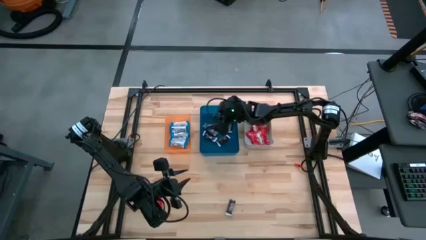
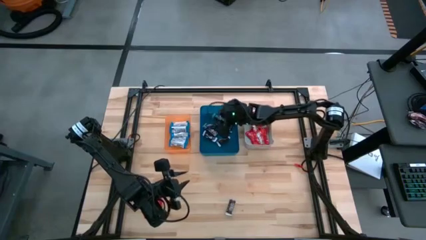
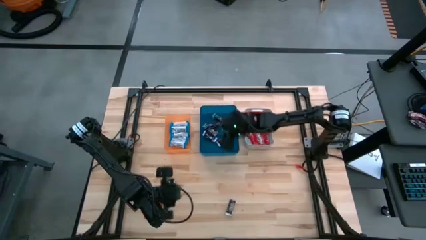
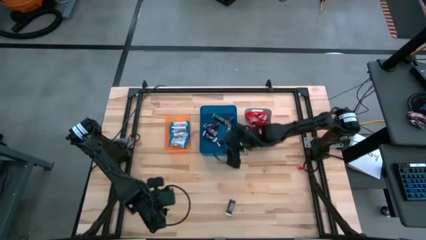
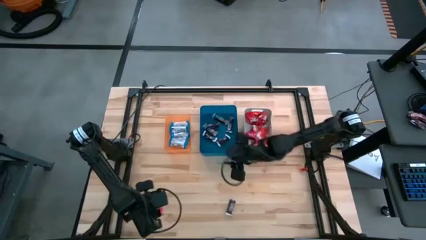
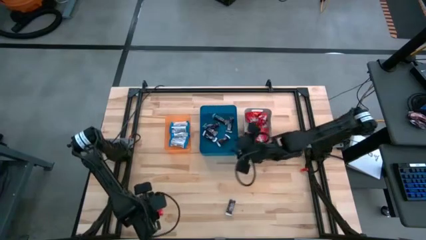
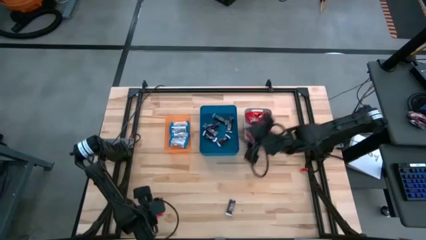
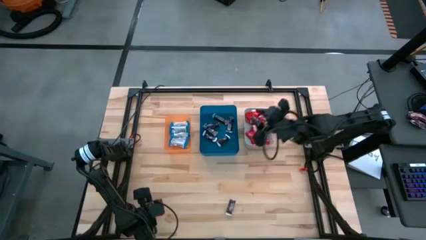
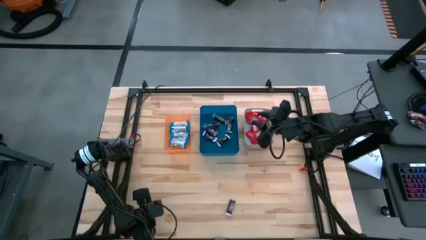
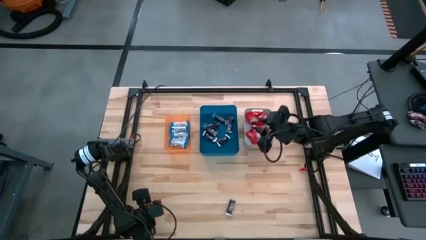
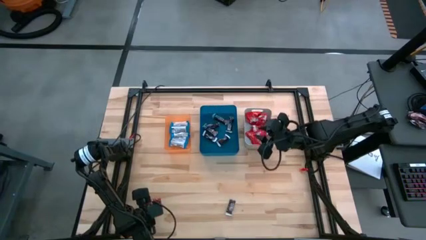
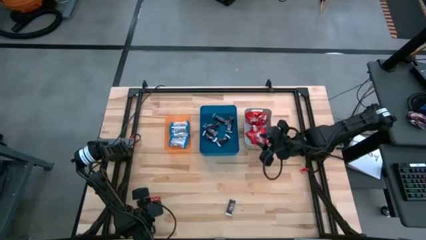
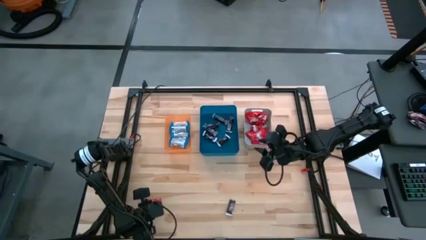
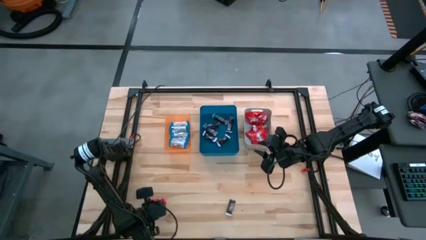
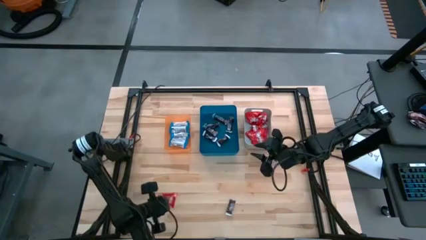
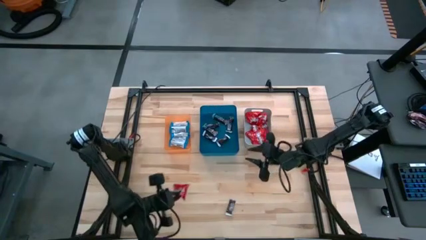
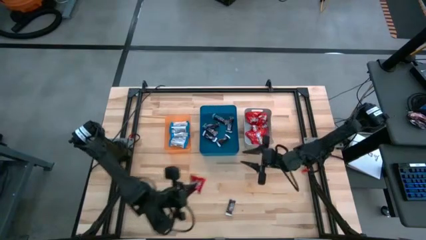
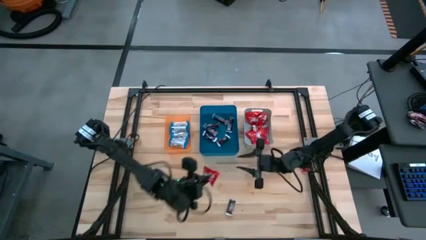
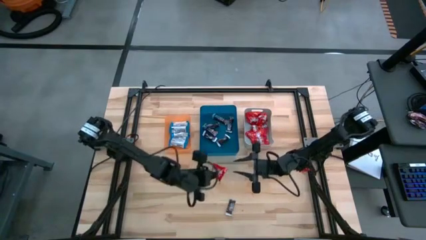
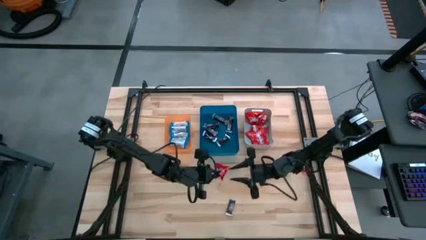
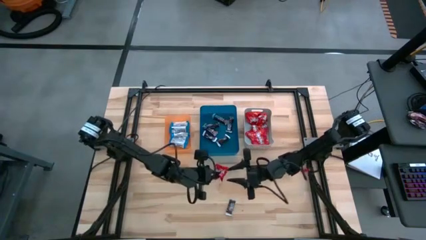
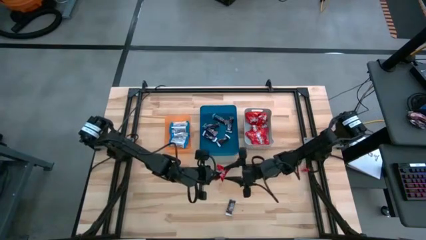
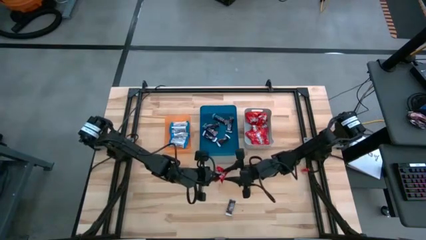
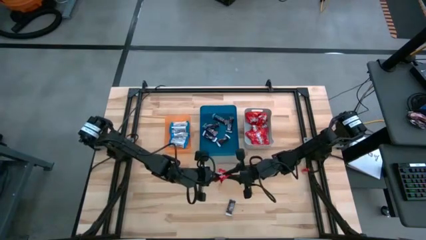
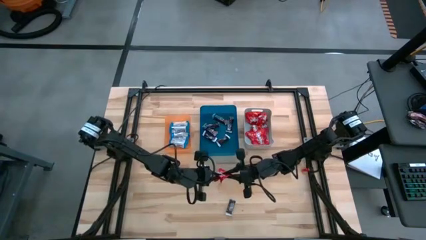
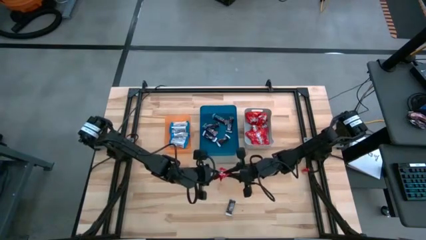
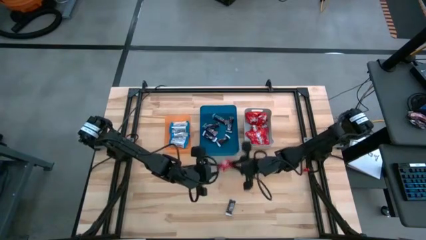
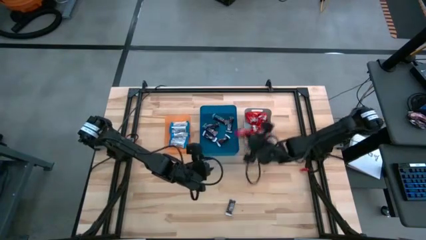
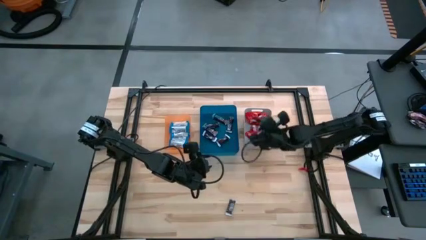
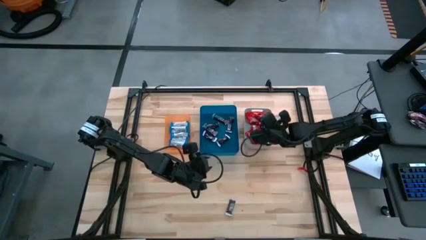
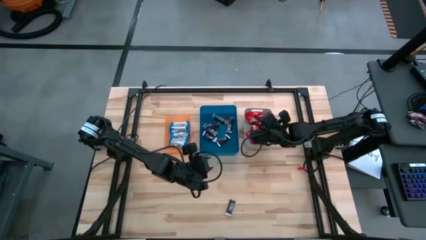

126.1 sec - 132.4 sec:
Task: Sort candy
Put the red candy into the gray bin

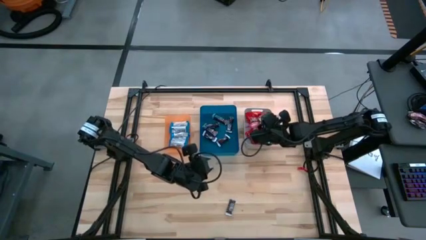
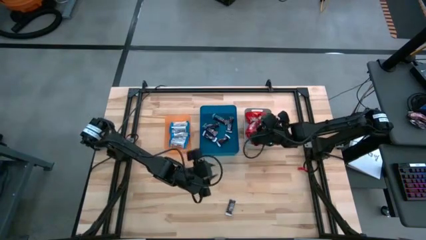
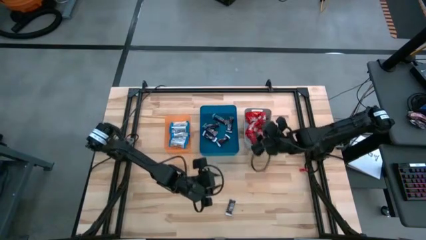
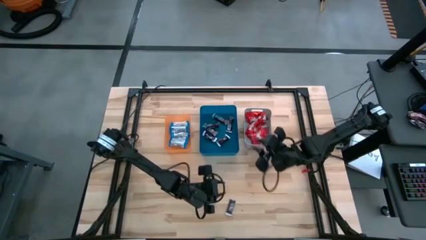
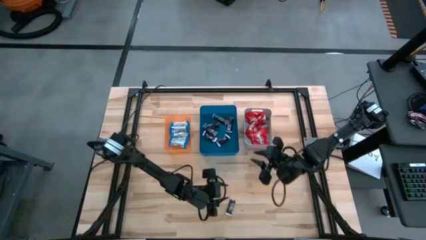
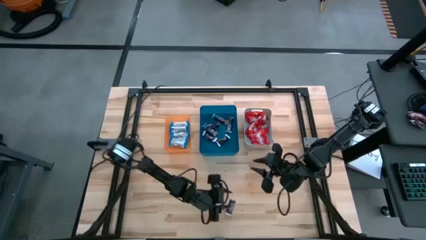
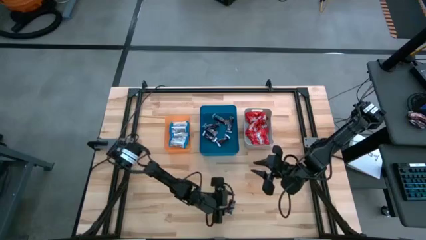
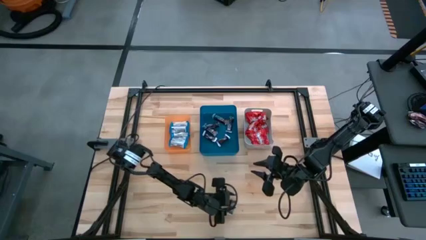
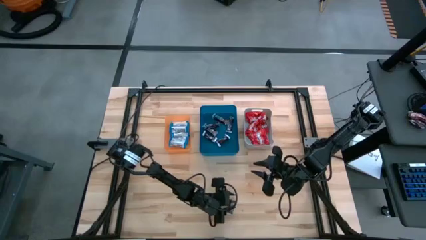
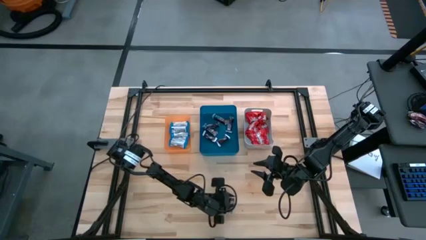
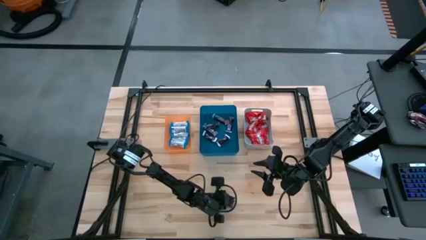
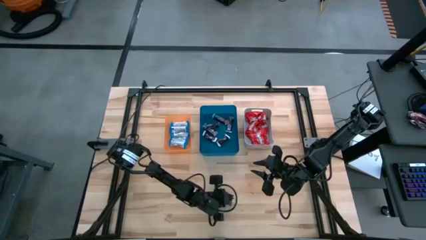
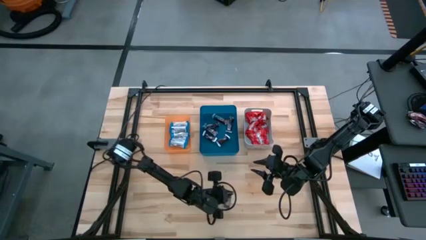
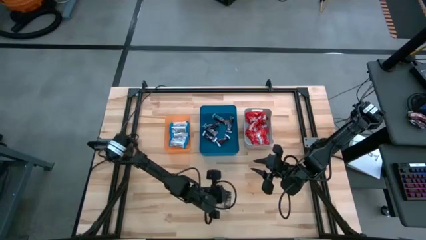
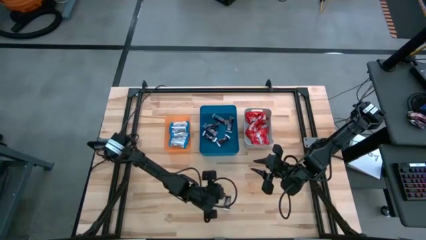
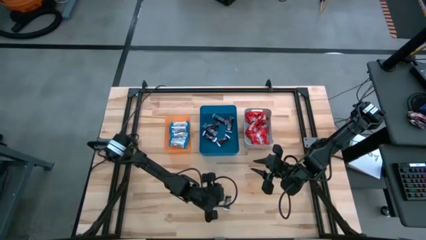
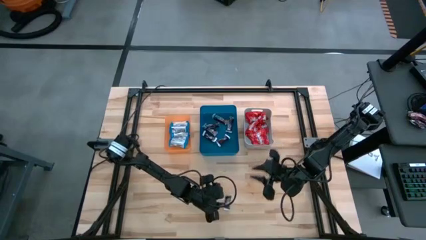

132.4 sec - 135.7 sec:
Put the brown chocolate bar into the blue bin

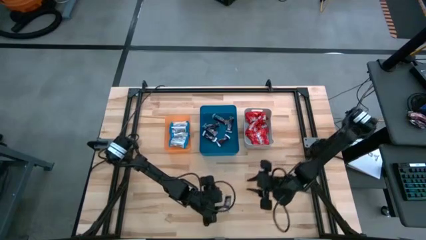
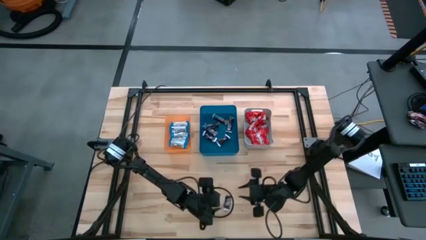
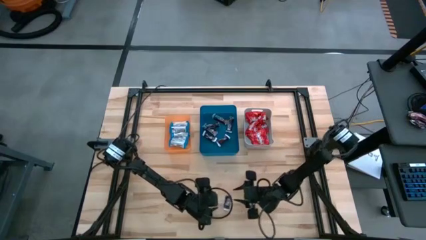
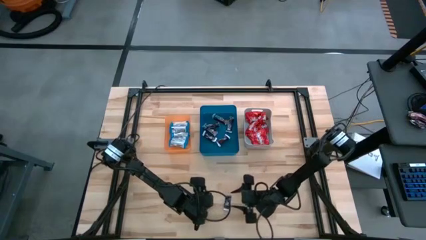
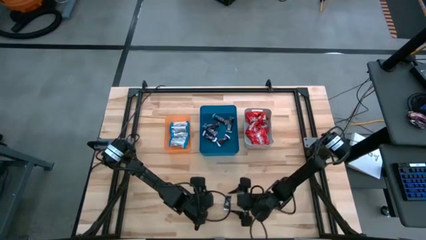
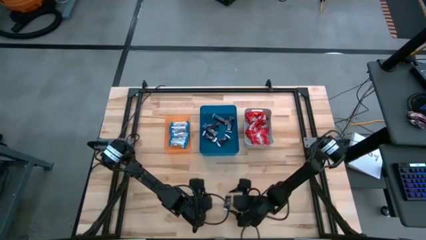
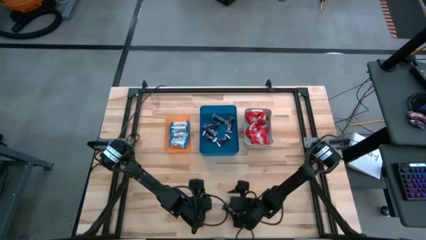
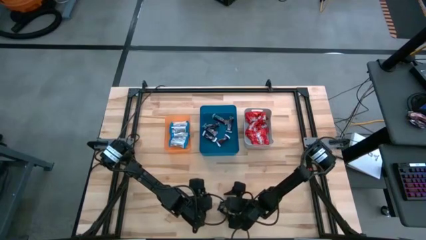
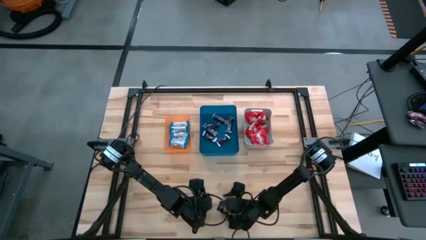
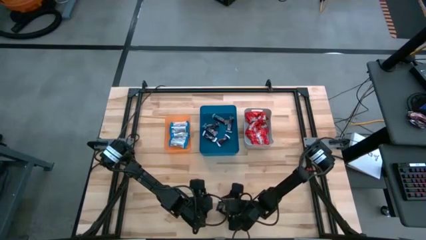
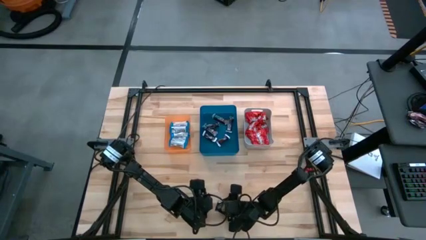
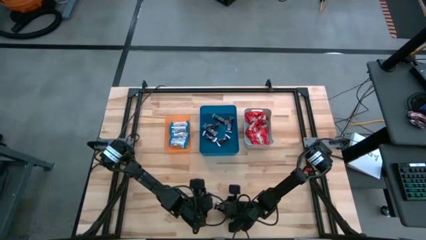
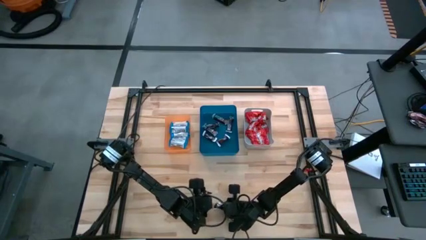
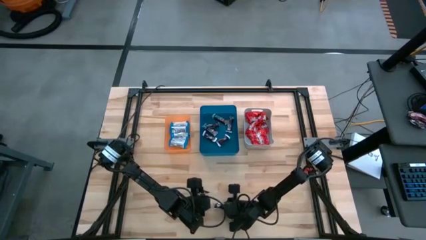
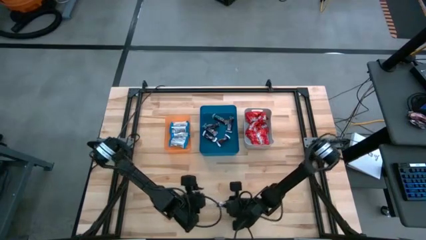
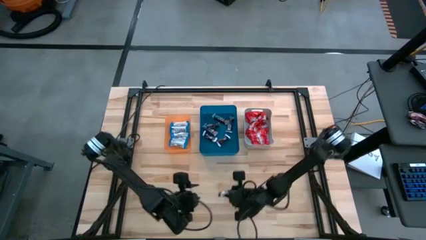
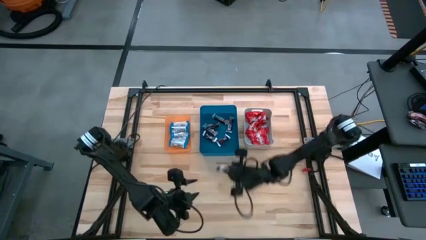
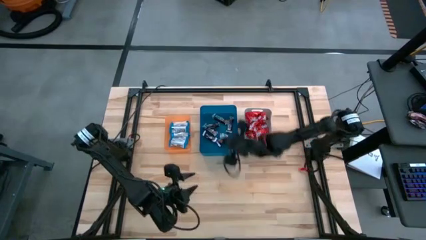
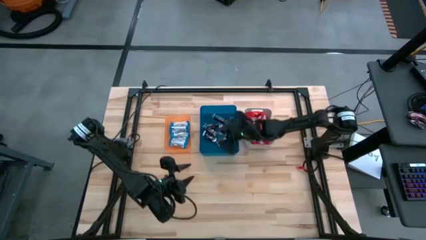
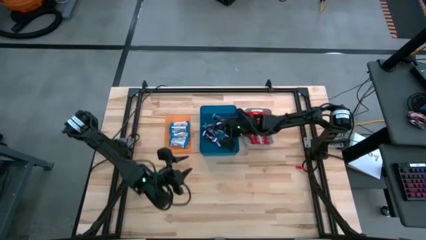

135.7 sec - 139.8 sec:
Put the brown chocolate bar into the blue bin

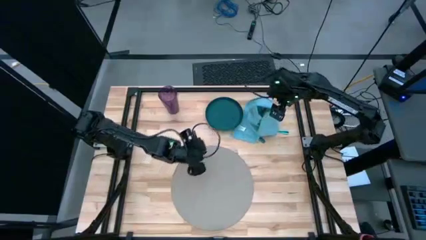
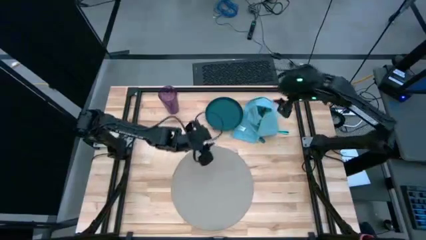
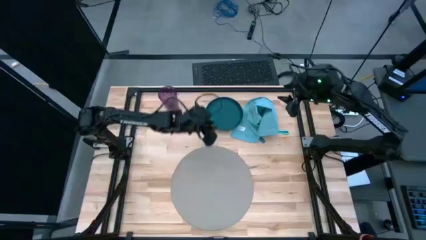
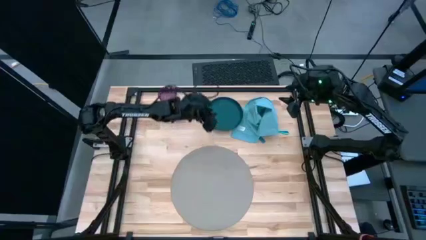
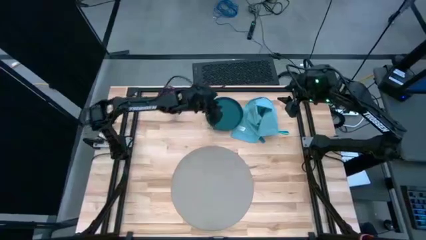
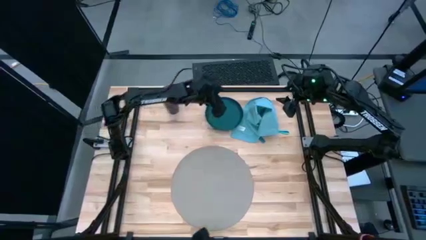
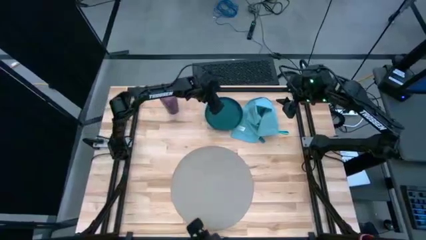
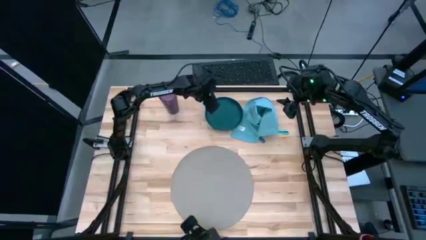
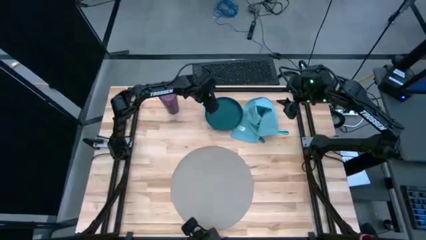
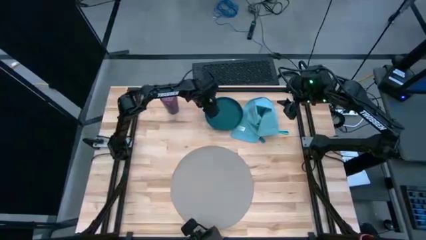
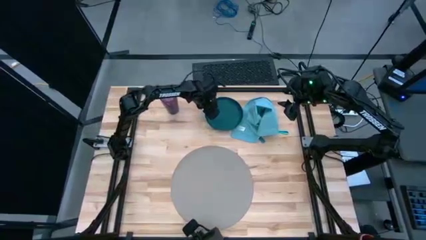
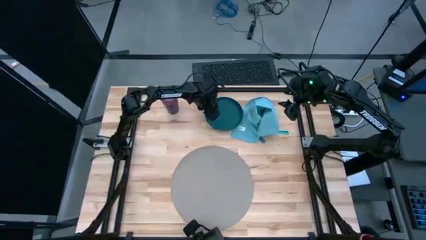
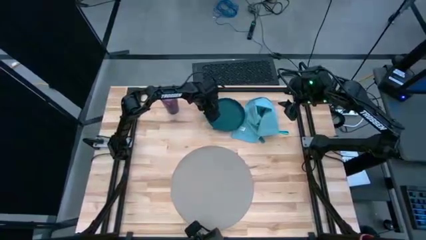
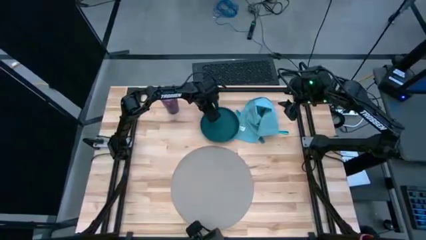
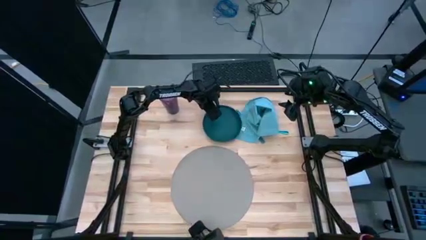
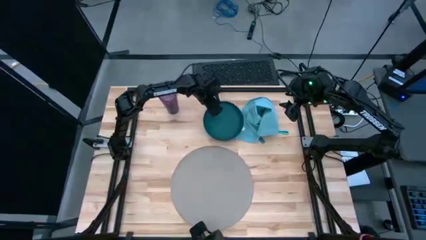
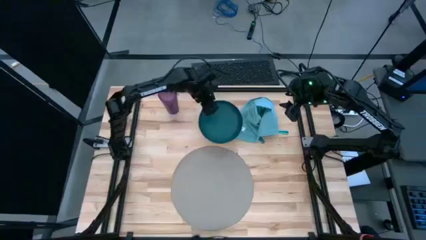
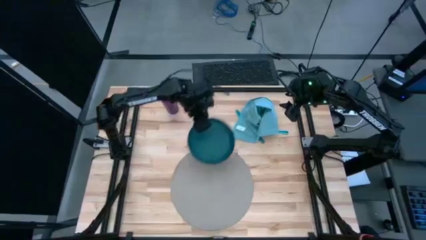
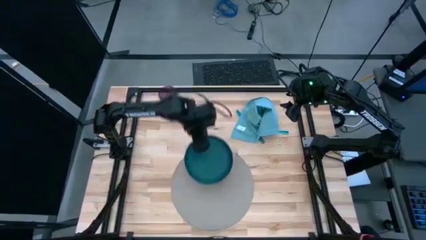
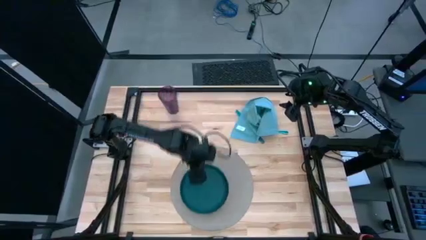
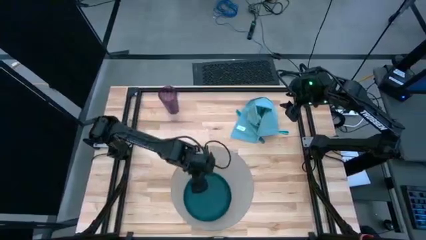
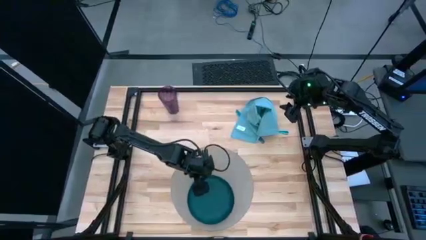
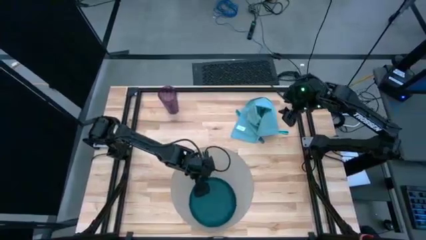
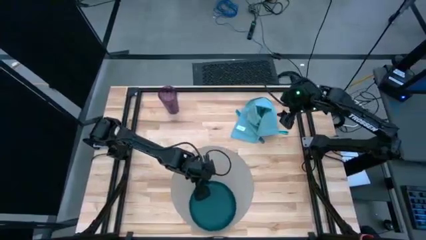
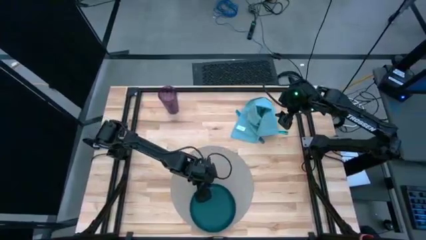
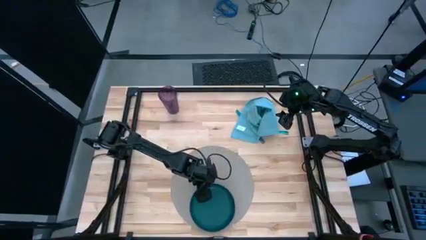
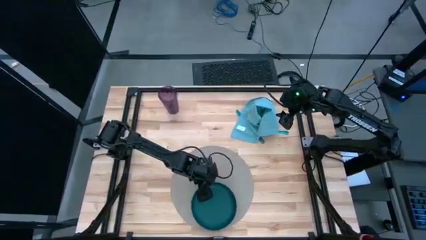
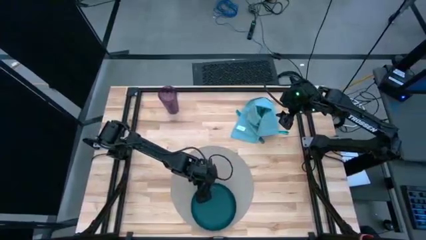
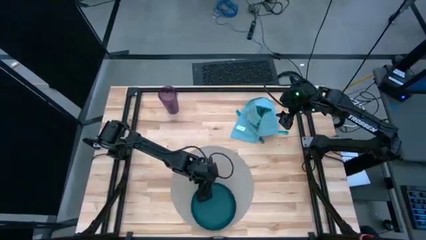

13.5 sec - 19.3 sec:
Task: Set table place
Put the green plate on the bottom of the gray placemat
